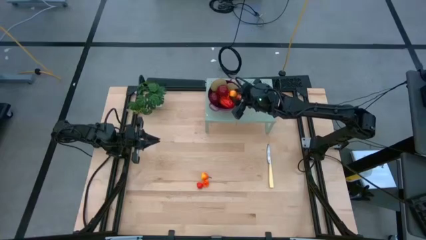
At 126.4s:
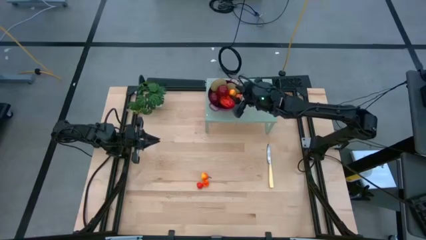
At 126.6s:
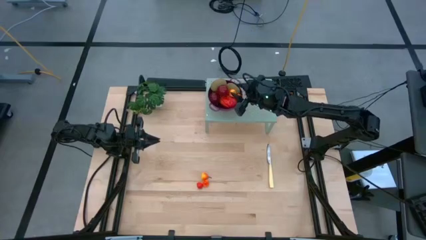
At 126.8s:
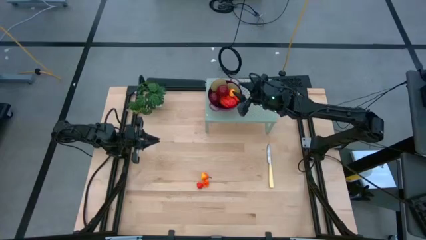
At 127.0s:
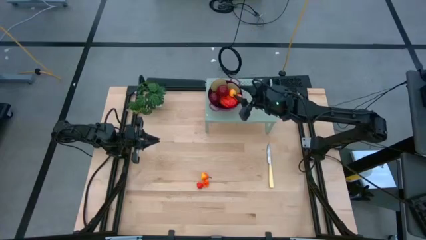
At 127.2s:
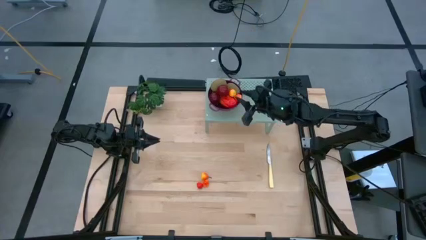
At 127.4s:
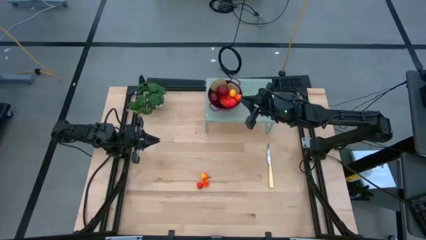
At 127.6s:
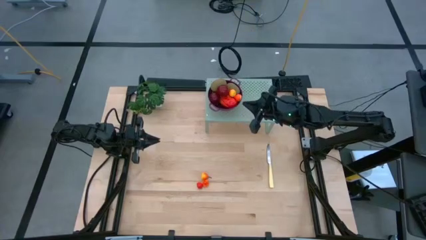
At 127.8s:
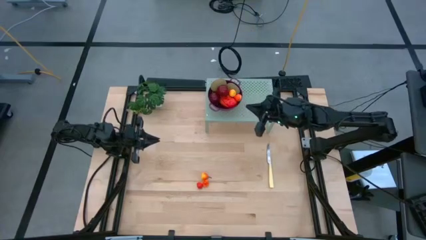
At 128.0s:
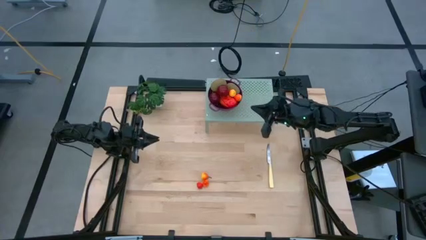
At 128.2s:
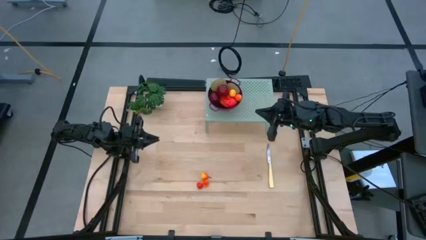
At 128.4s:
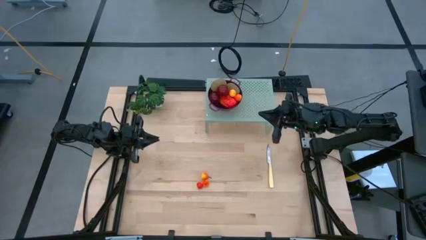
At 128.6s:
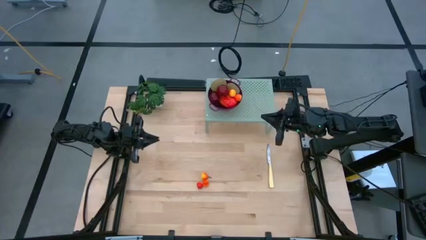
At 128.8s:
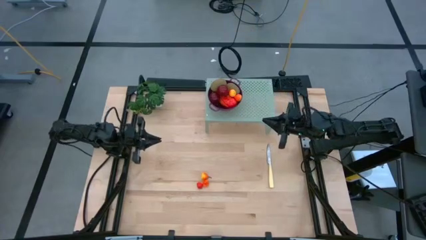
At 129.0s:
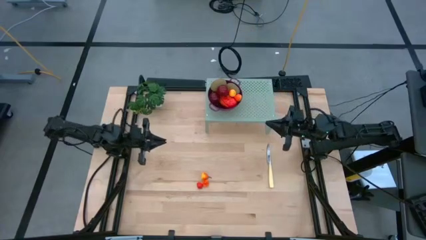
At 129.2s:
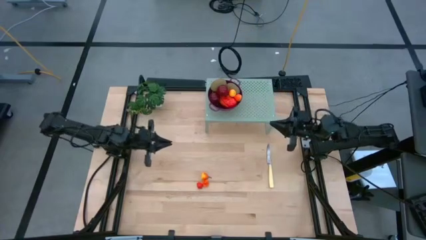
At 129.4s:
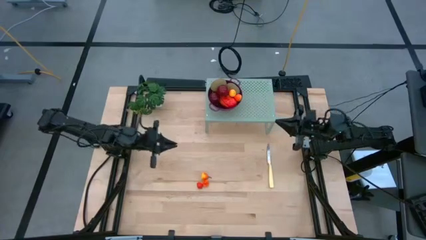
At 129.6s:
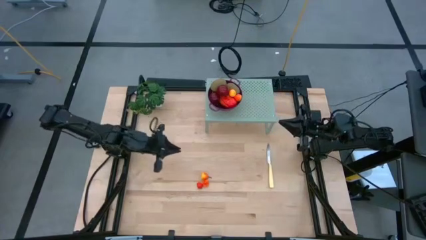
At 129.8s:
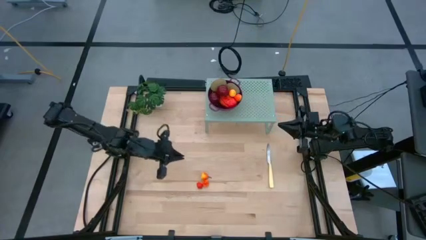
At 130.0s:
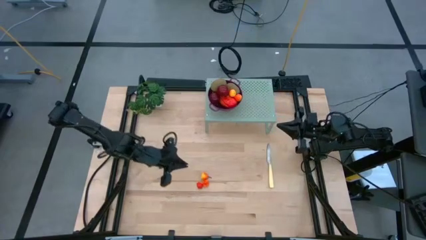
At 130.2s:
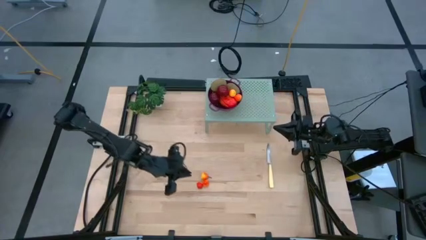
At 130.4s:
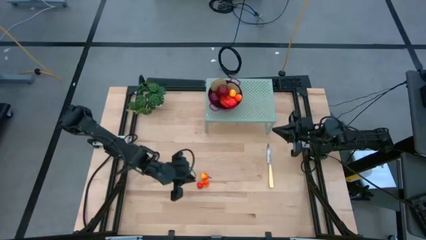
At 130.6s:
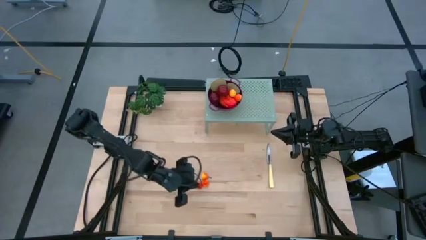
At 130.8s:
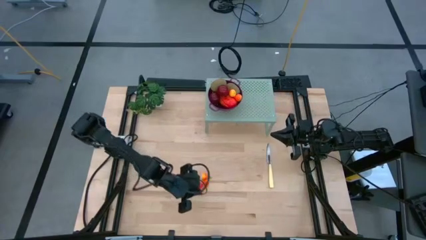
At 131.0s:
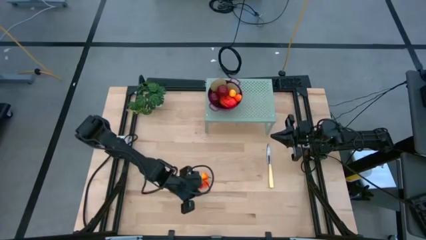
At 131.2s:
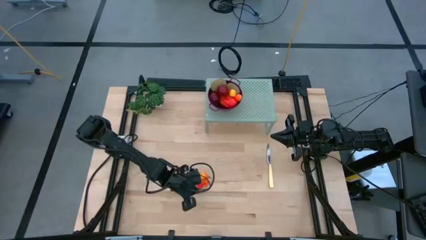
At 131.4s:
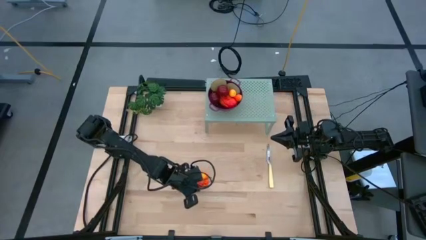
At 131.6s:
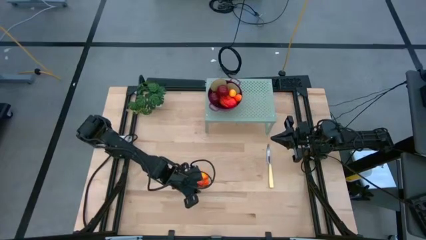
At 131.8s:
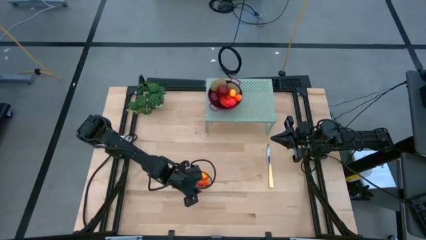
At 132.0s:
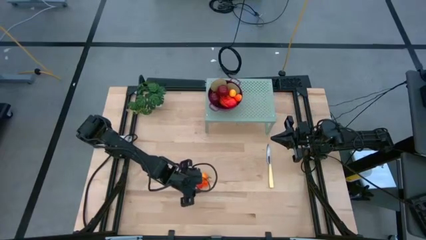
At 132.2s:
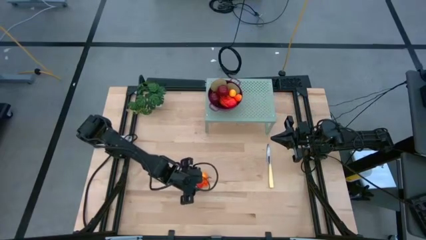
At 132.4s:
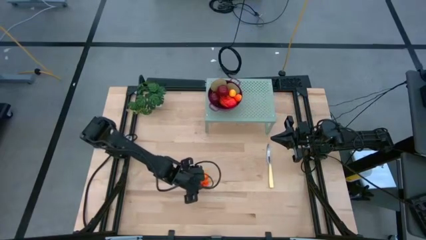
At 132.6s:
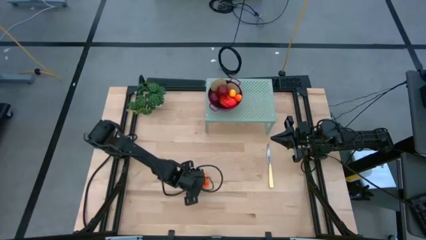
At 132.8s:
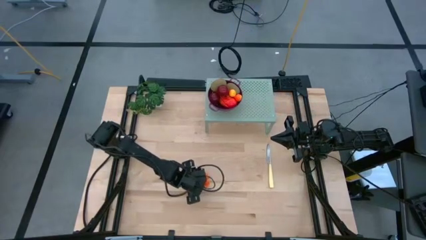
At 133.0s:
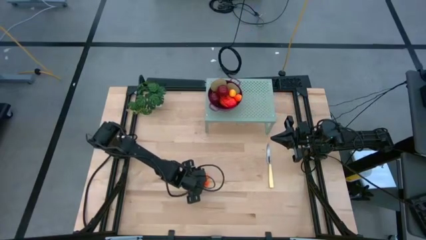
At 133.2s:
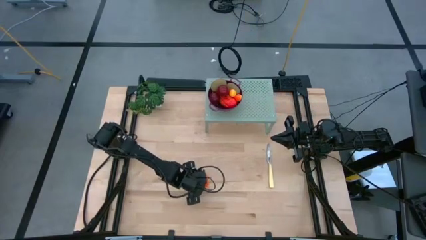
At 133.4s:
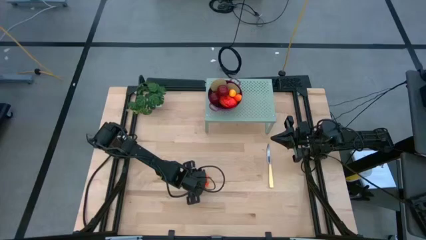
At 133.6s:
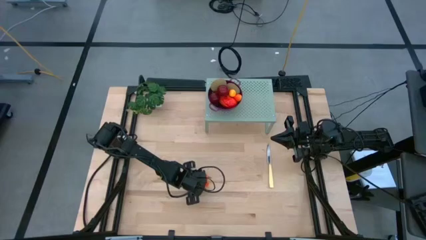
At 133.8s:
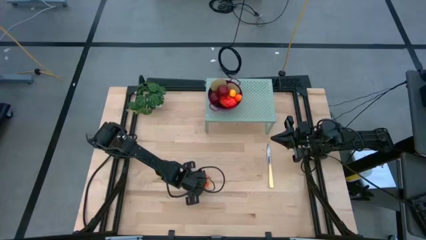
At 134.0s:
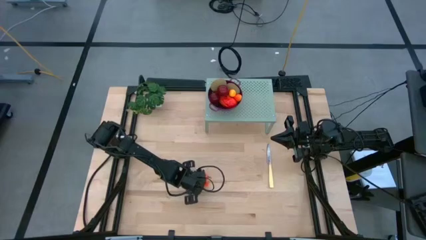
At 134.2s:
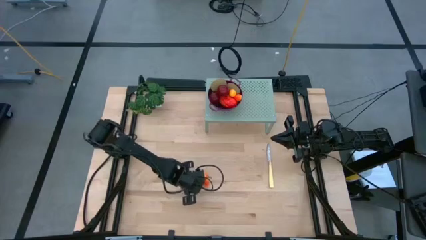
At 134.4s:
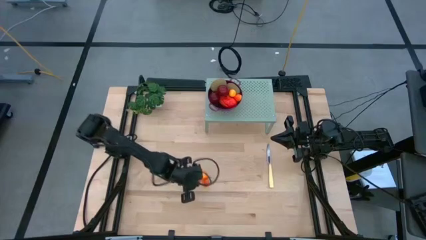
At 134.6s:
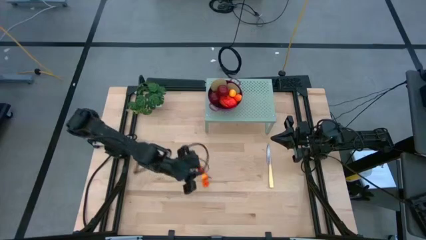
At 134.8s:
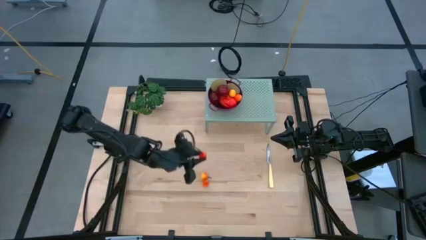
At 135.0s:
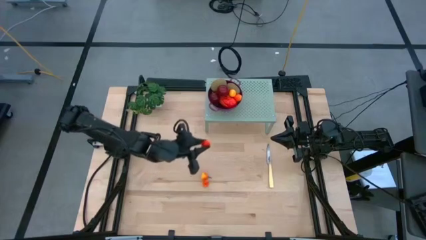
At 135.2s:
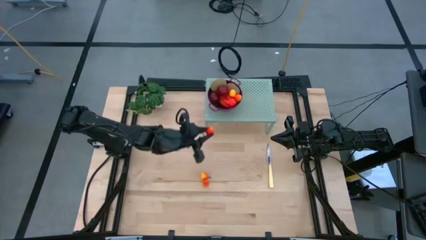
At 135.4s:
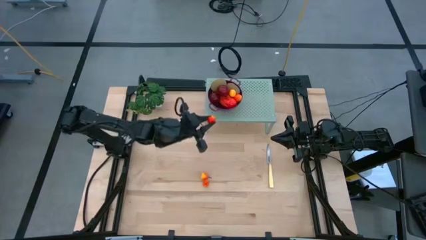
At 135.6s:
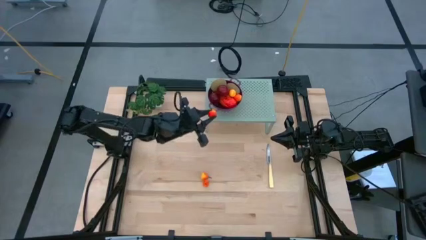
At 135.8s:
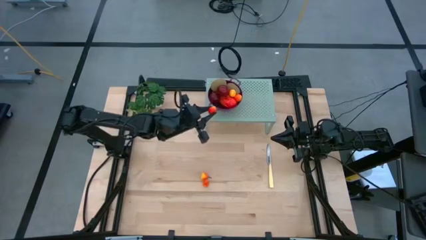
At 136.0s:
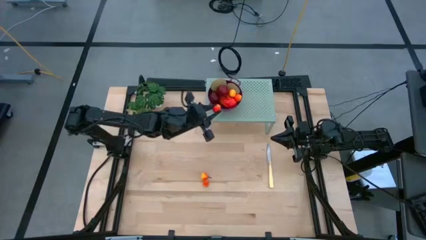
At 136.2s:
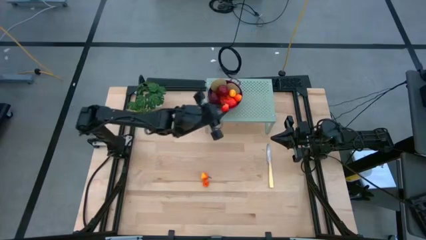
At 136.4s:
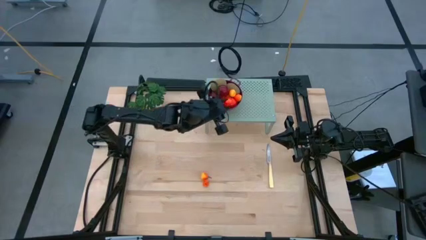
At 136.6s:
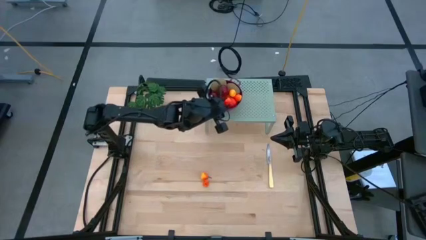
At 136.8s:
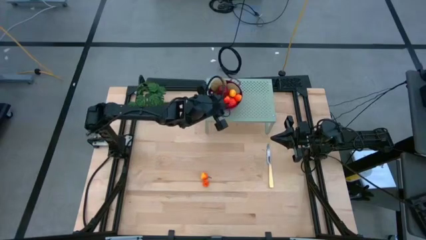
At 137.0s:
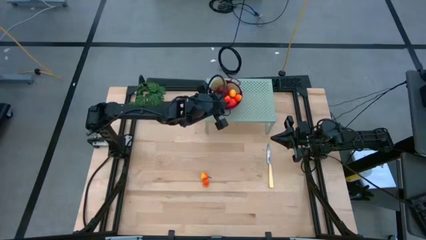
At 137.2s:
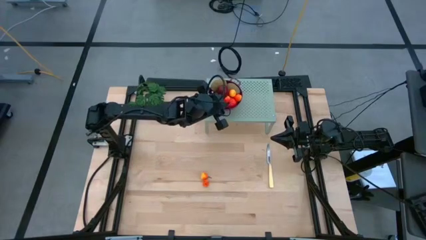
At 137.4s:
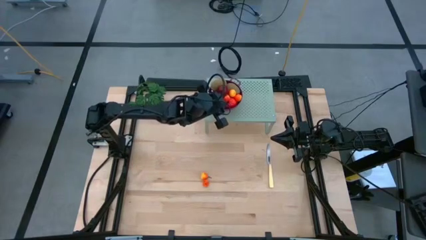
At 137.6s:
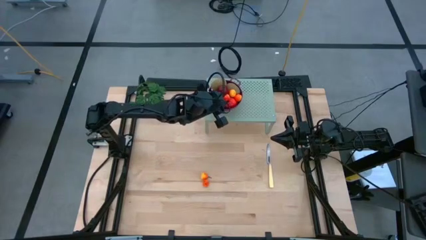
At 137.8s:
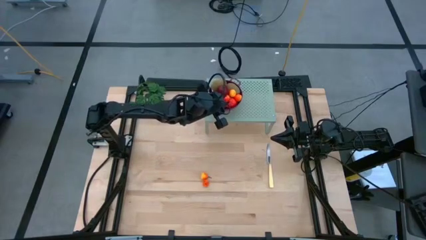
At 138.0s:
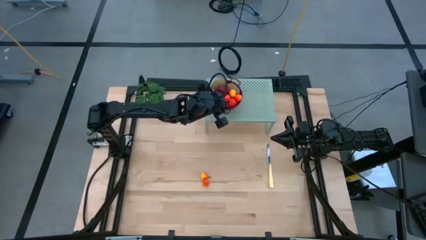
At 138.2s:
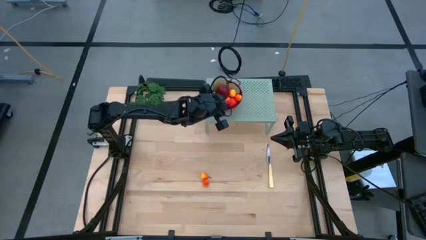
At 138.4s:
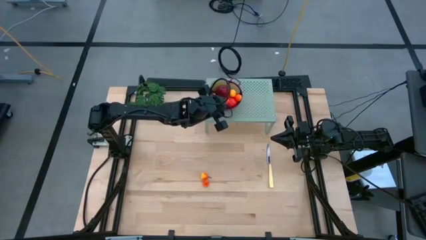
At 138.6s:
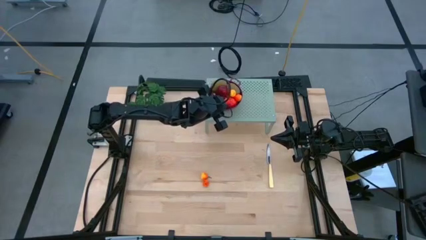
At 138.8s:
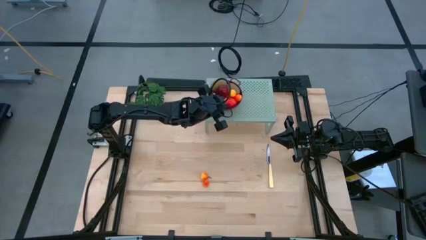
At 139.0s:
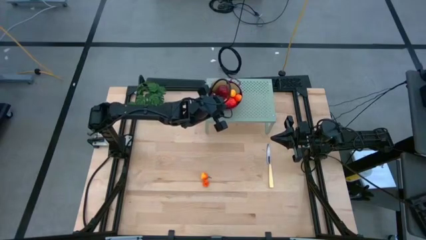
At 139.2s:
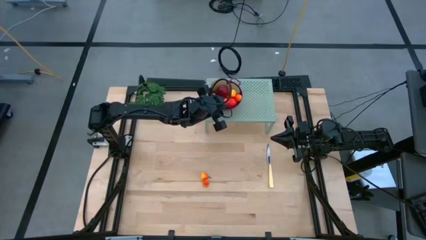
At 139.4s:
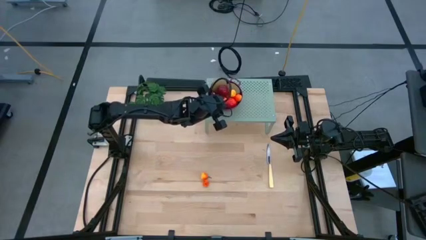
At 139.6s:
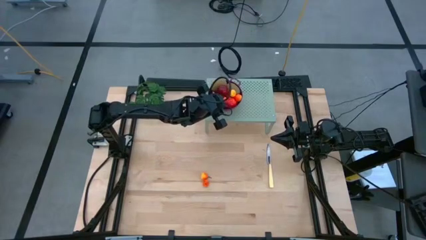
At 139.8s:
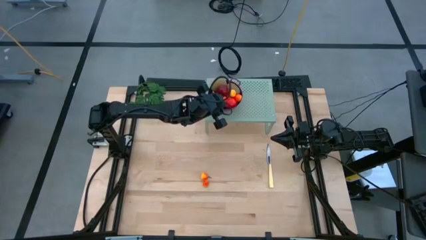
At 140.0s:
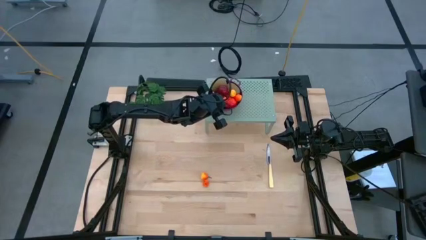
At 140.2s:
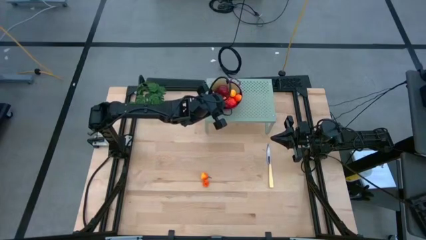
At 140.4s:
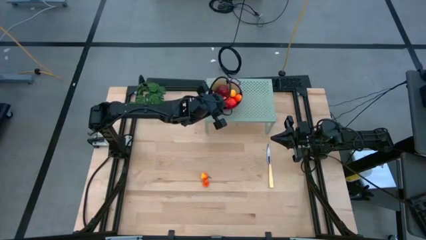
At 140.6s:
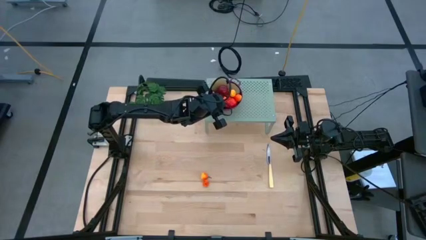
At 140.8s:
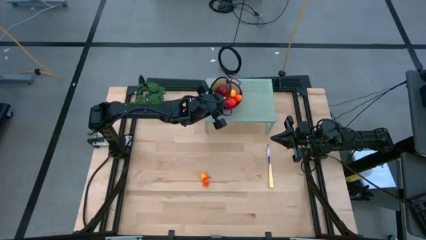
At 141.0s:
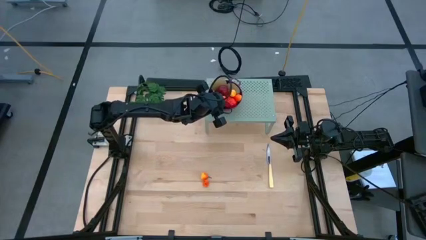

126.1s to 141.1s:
Task: Pick & Place Fruit
Put the pear into the dark red colander on the shelf
